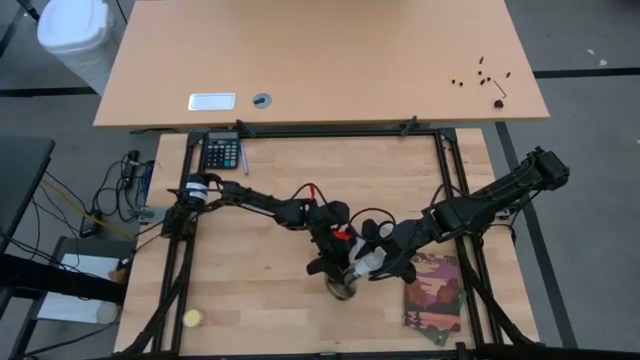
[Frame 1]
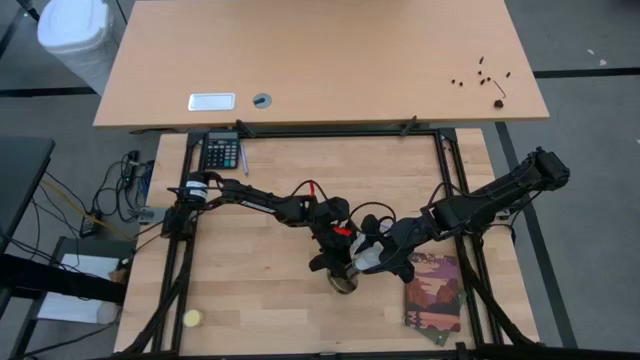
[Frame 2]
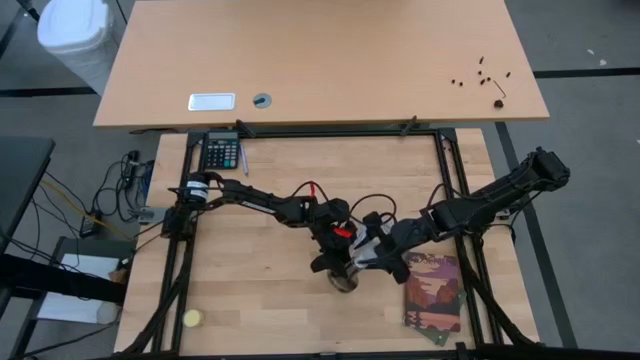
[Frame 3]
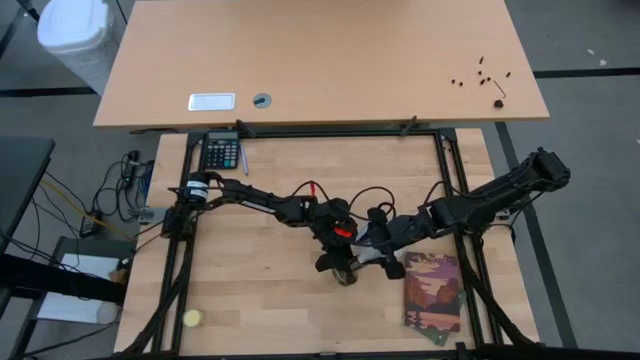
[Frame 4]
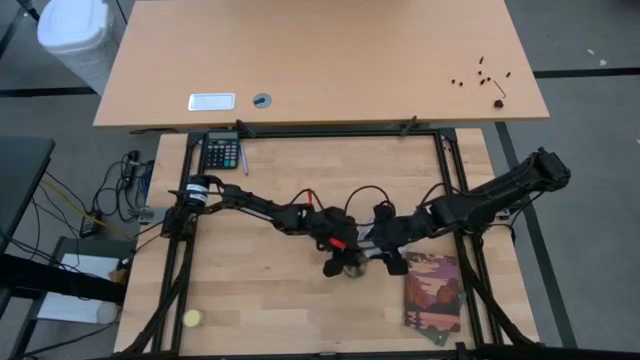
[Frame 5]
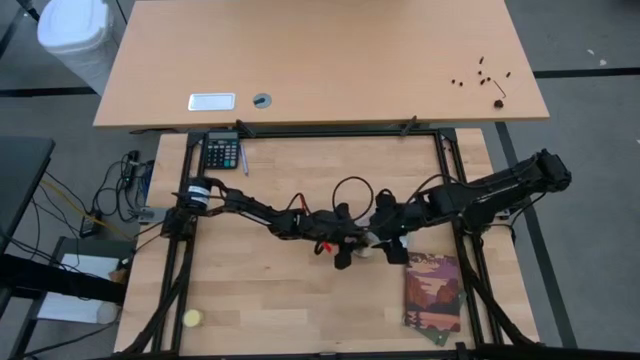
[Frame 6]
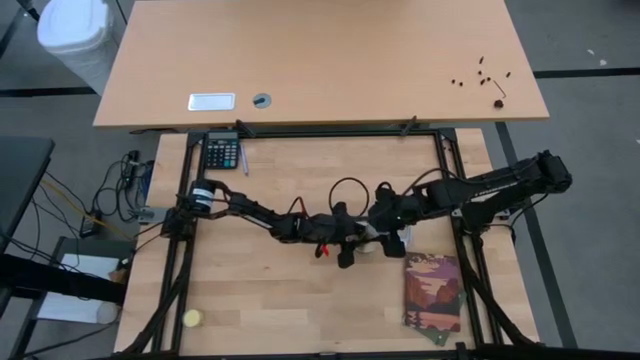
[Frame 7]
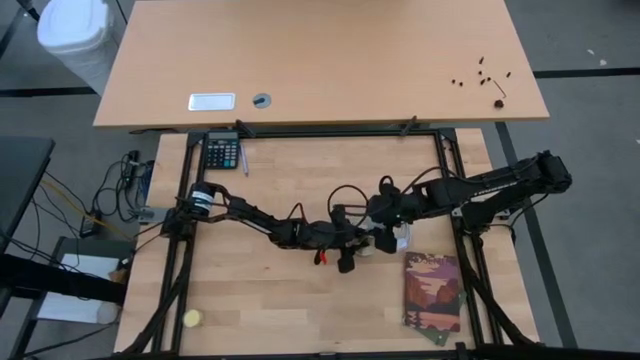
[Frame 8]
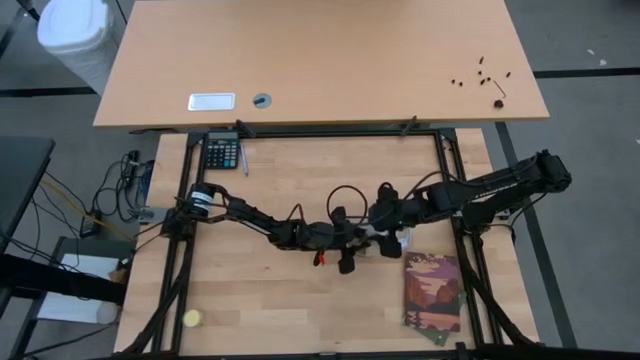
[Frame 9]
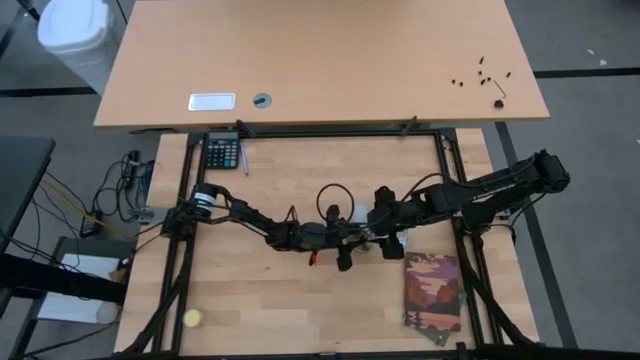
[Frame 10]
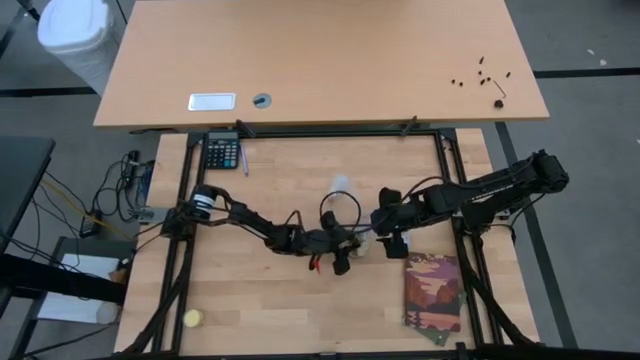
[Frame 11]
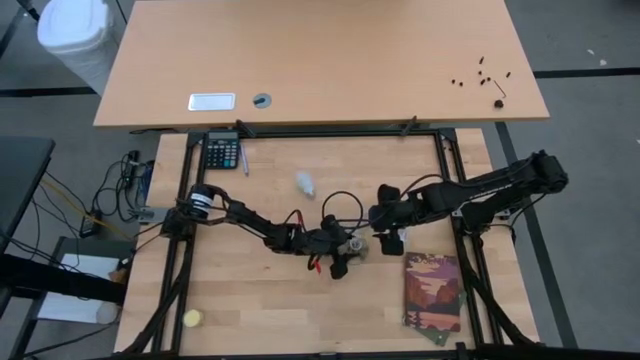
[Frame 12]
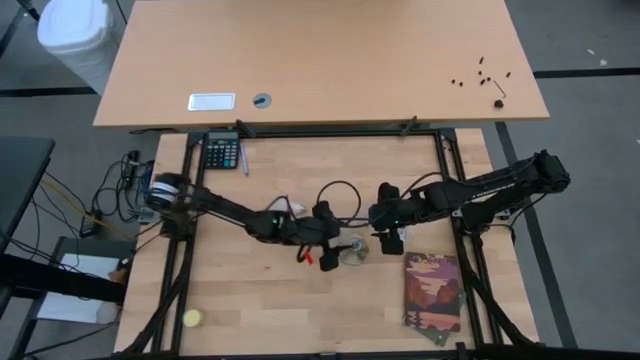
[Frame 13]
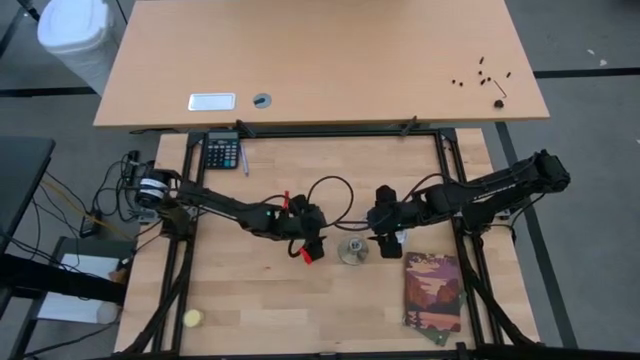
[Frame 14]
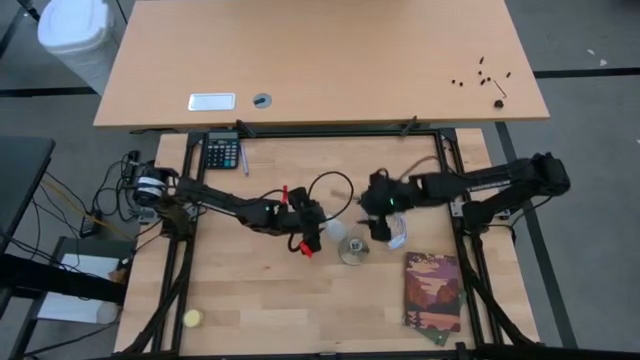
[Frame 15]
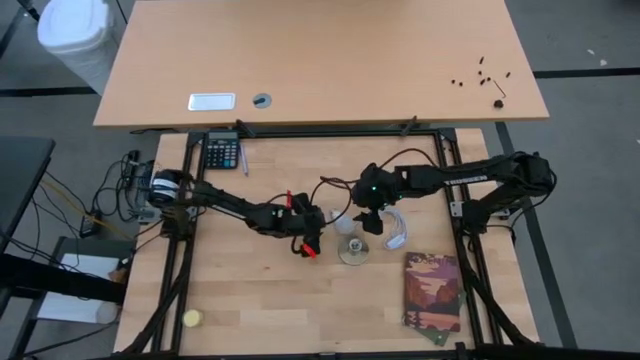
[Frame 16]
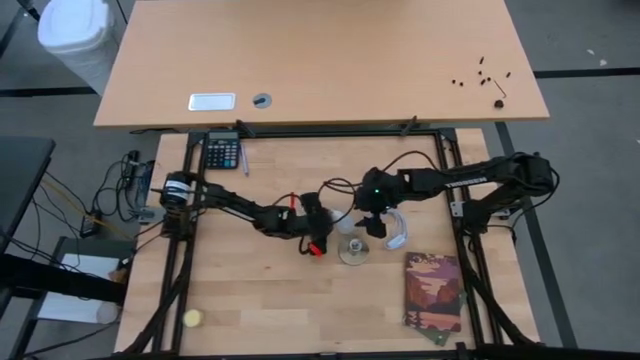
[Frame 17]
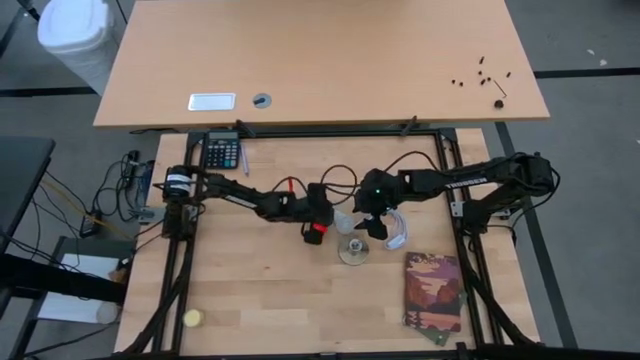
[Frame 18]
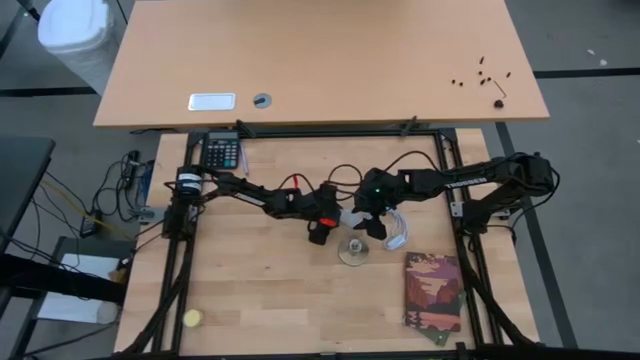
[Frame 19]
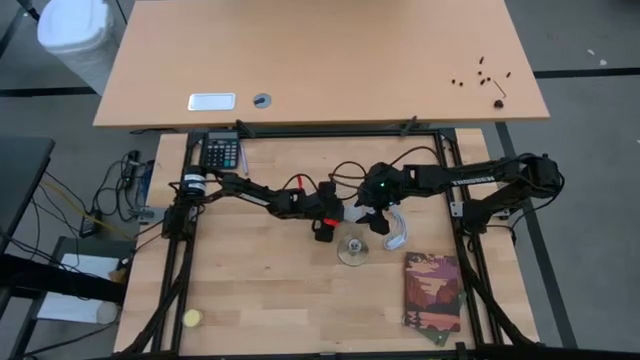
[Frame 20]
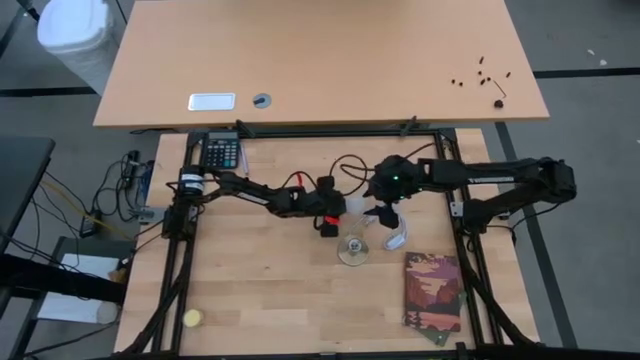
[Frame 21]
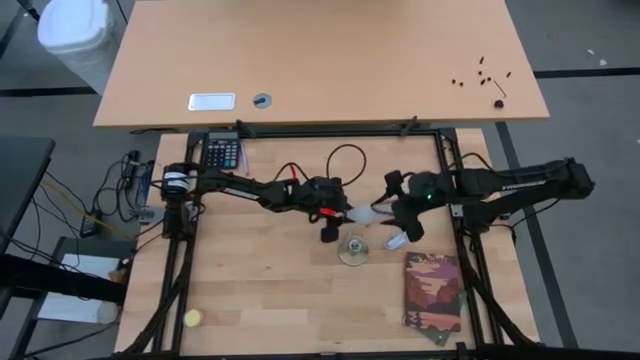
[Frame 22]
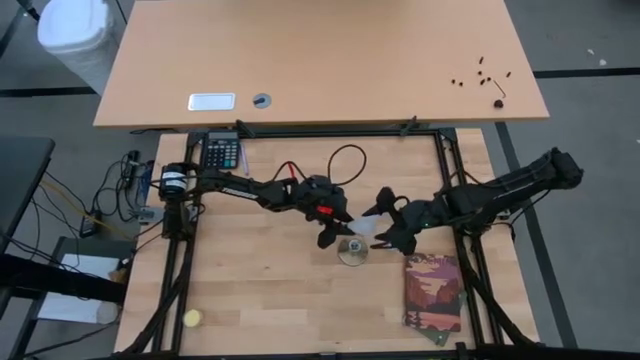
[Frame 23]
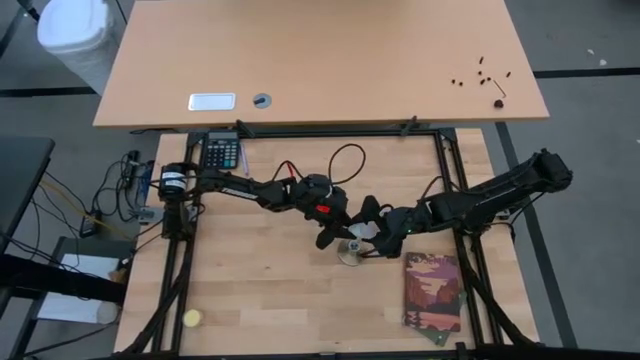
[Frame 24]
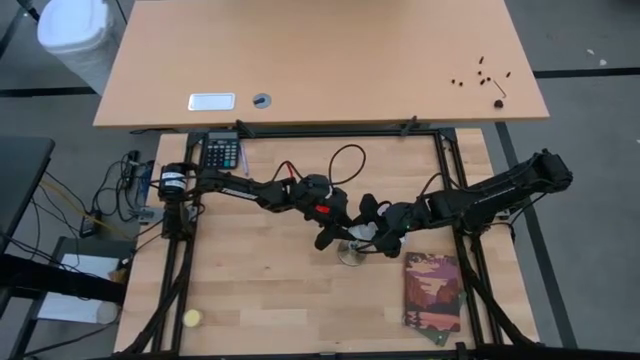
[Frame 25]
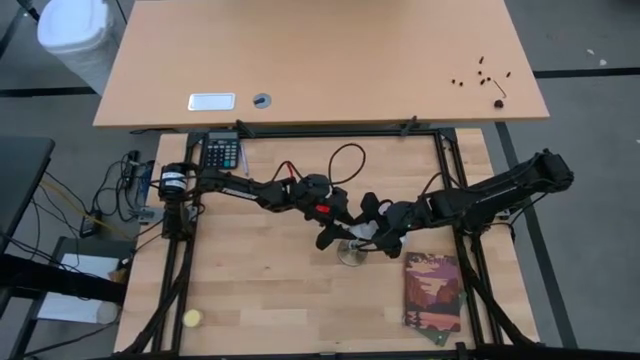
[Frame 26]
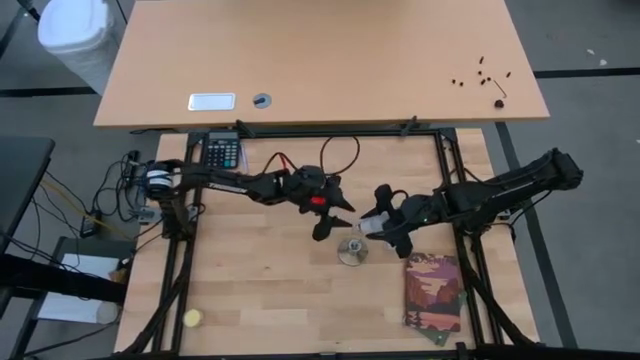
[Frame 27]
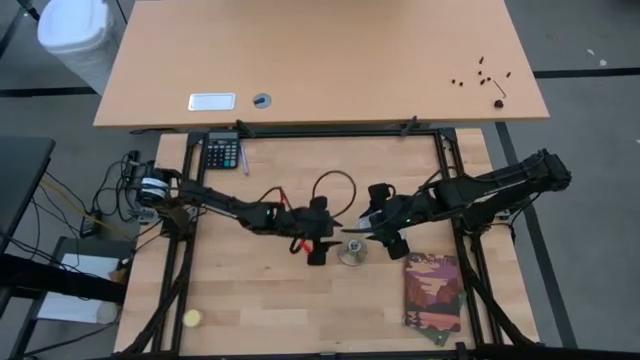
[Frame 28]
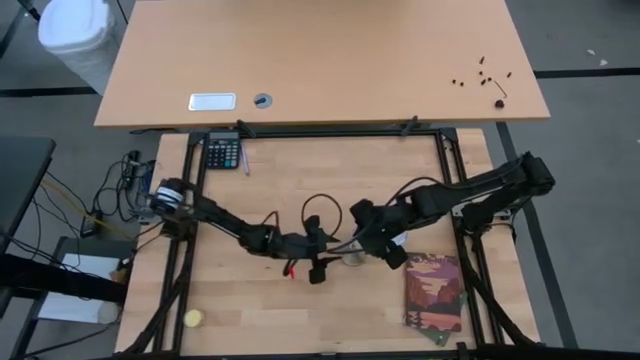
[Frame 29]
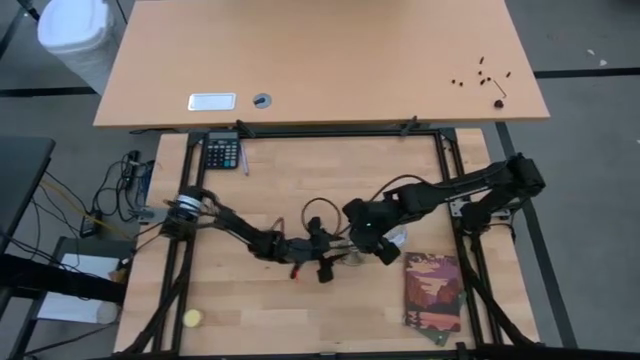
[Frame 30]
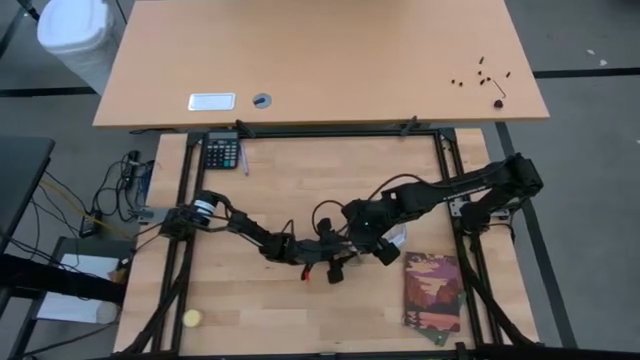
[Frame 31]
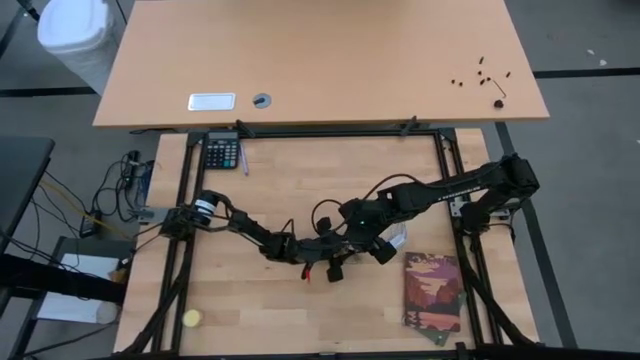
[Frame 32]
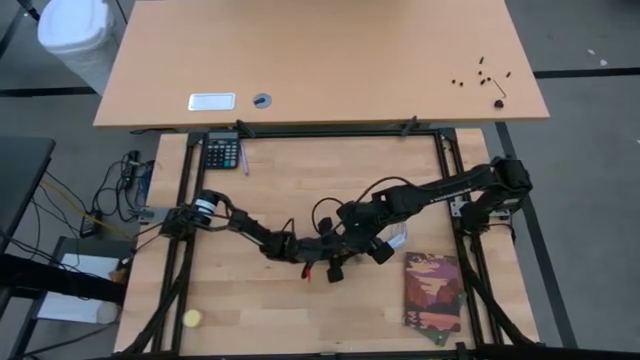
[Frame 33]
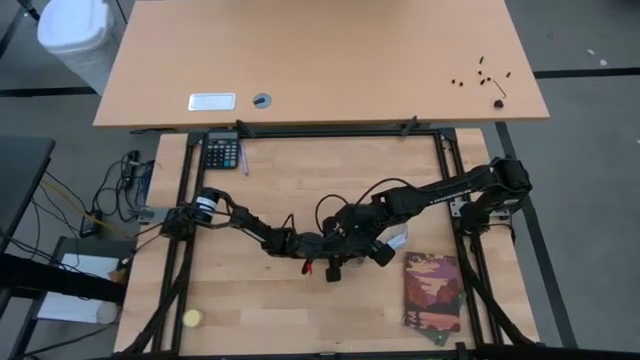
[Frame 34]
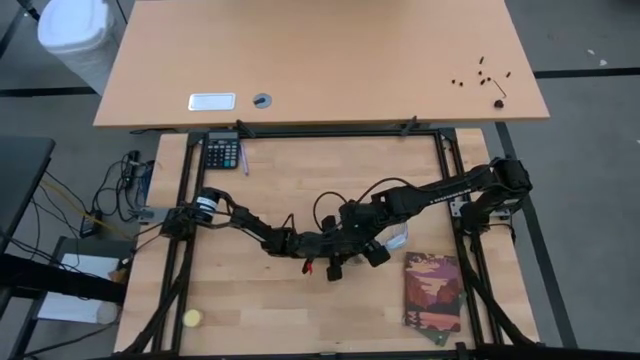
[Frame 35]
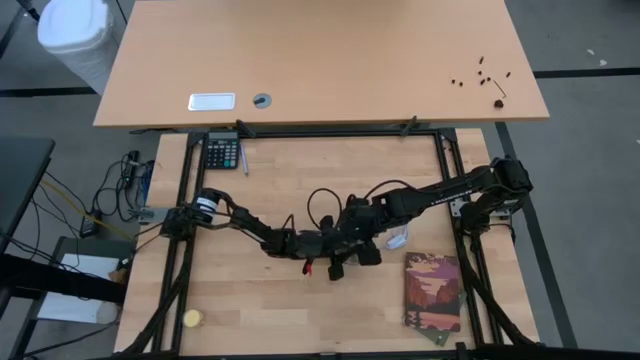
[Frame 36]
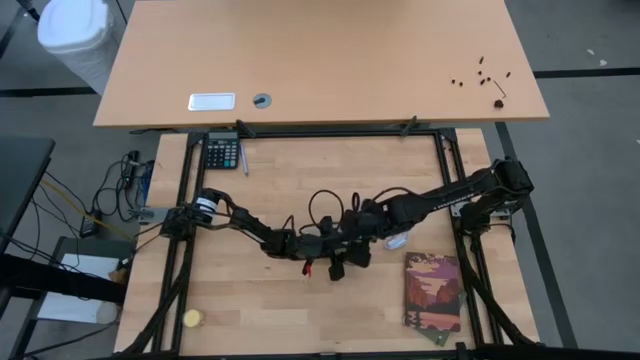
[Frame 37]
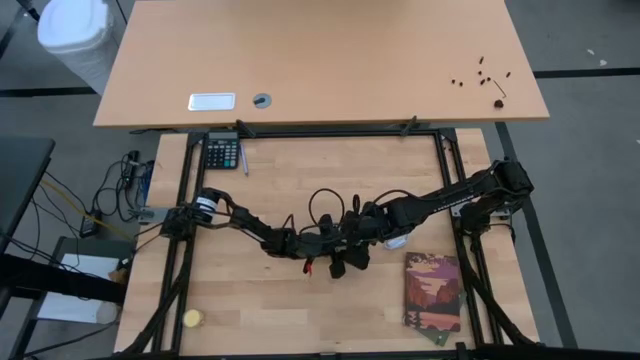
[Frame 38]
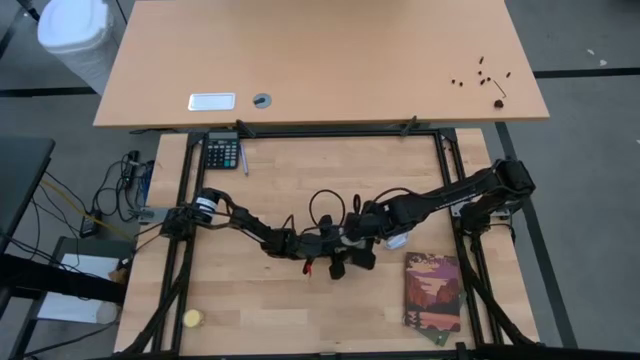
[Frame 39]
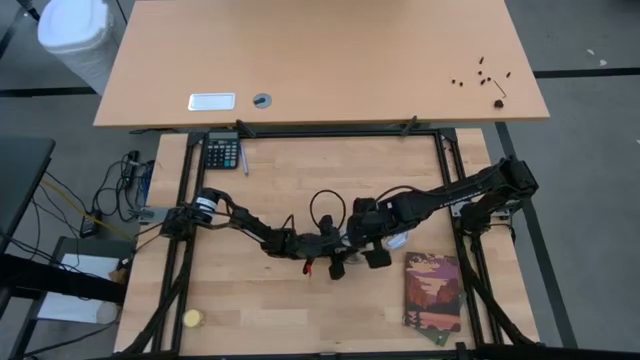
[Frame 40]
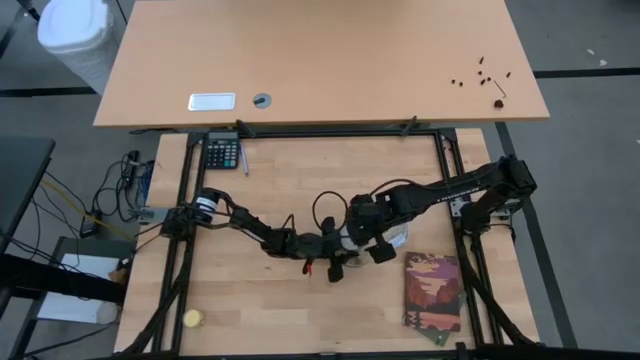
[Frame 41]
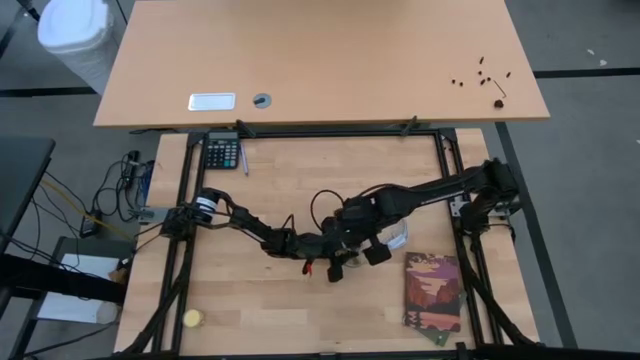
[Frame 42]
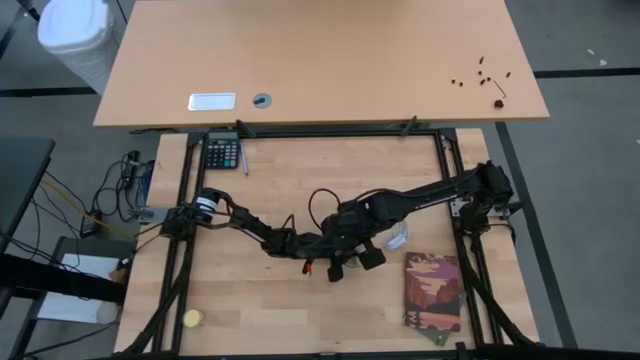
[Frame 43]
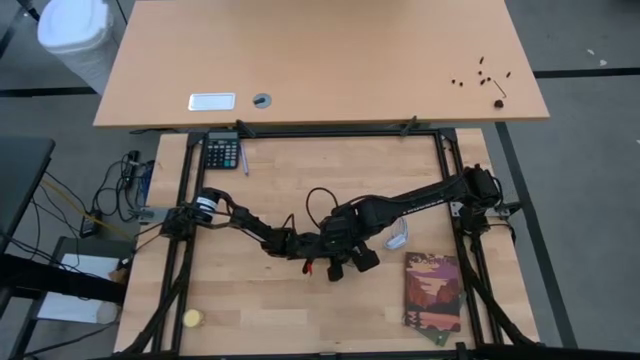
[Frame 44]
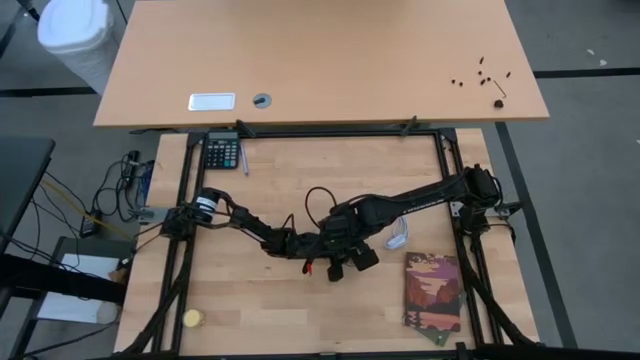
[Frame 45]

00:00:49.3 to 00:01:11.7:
Task: Screw lightbulb
Insert the lightbulb into the lamp socket
